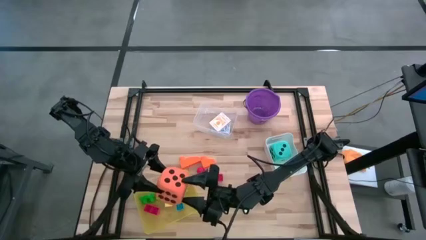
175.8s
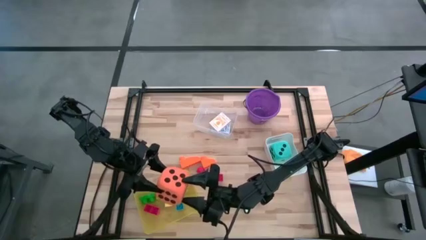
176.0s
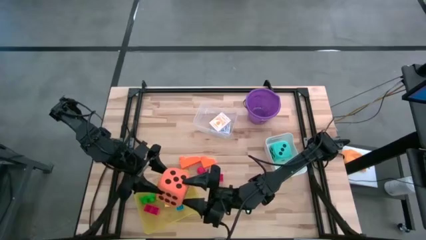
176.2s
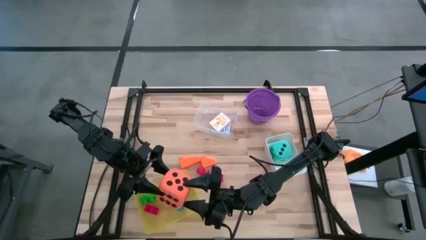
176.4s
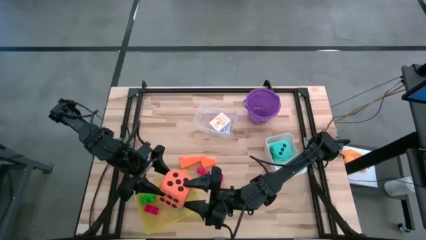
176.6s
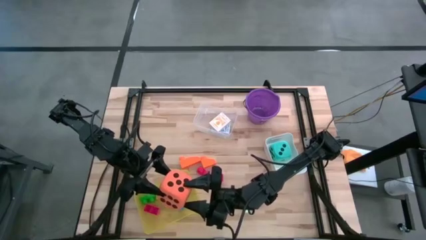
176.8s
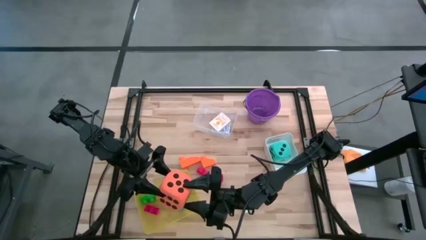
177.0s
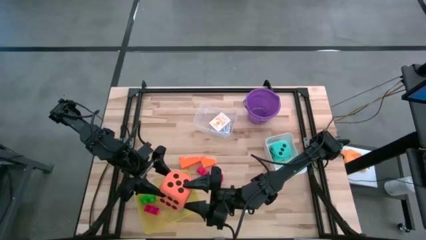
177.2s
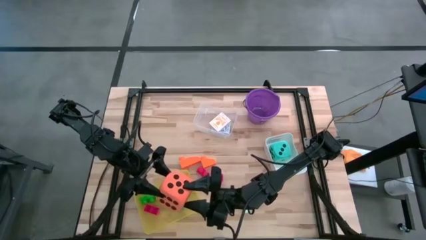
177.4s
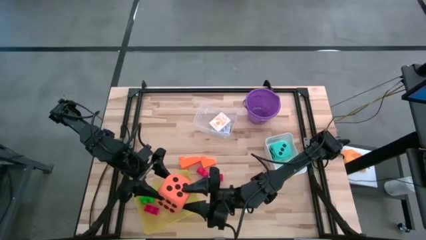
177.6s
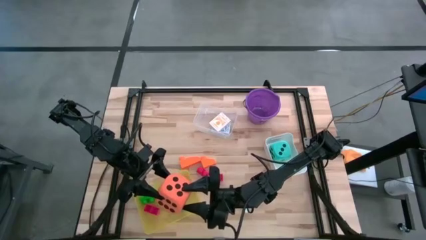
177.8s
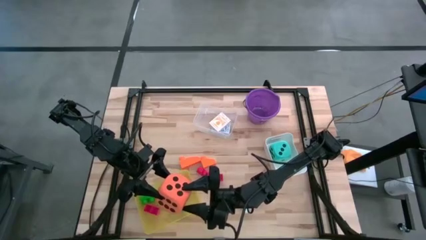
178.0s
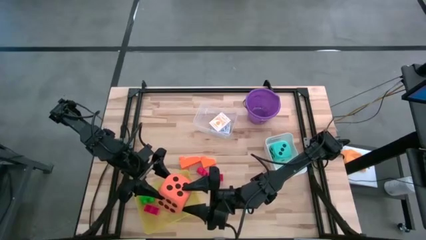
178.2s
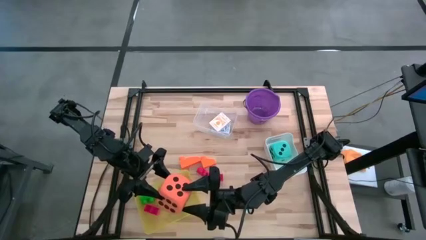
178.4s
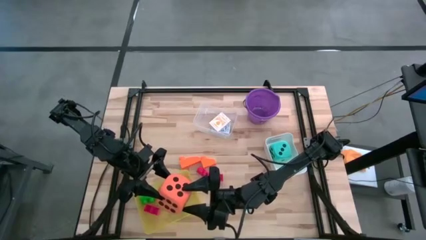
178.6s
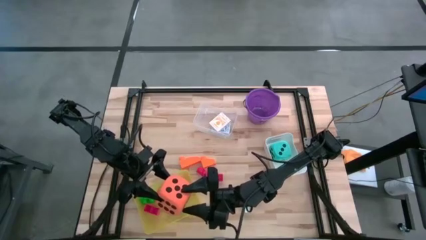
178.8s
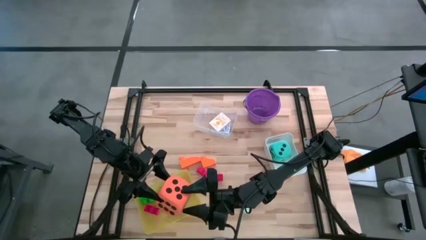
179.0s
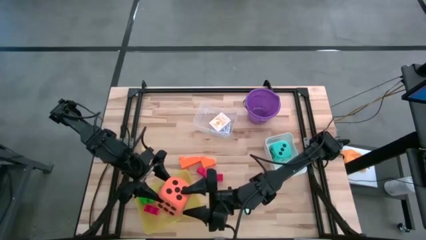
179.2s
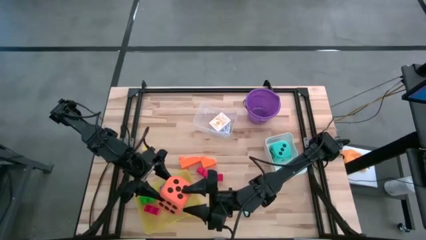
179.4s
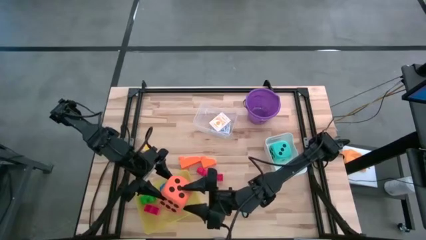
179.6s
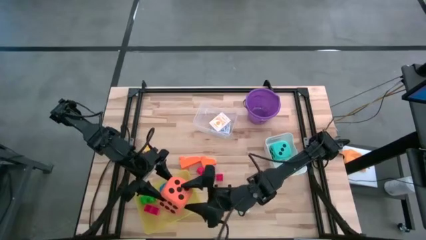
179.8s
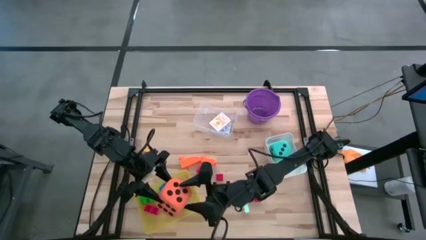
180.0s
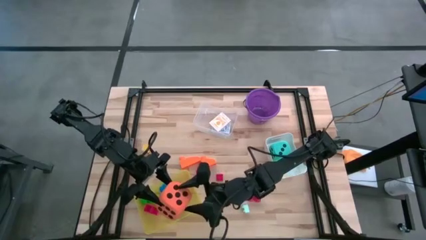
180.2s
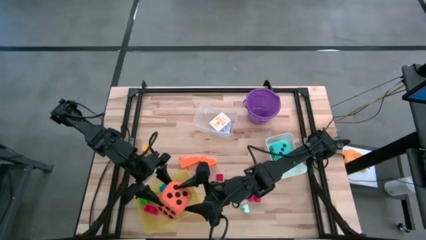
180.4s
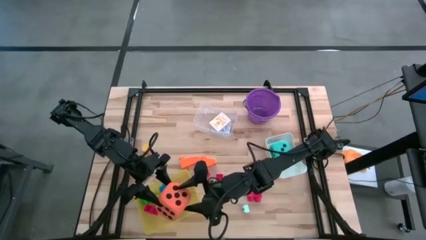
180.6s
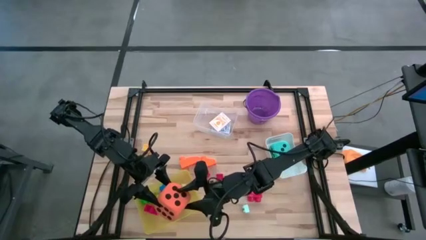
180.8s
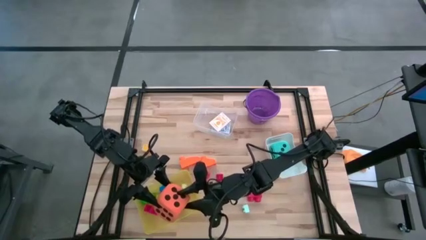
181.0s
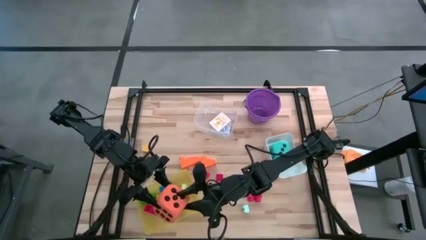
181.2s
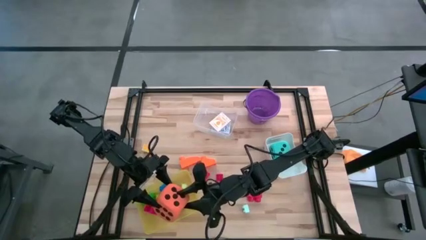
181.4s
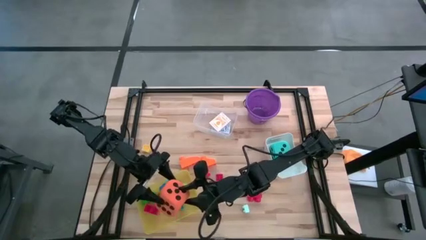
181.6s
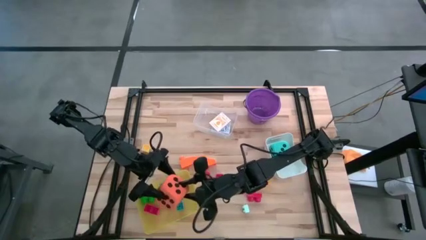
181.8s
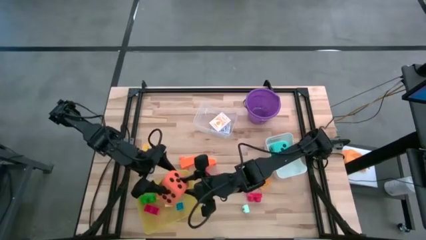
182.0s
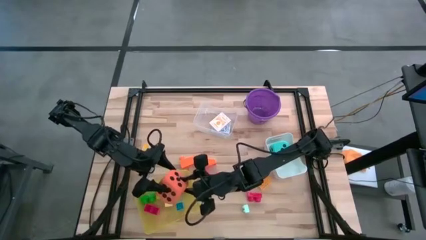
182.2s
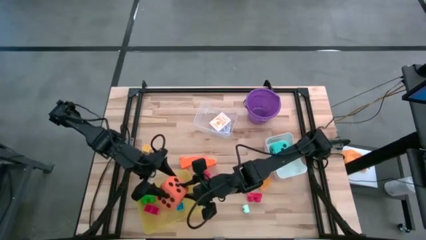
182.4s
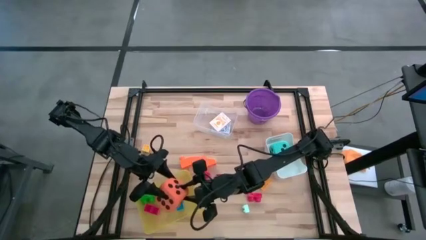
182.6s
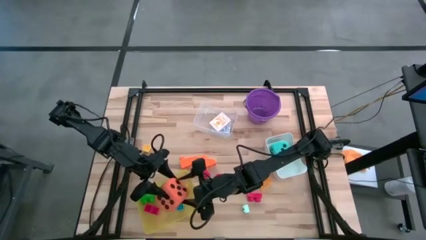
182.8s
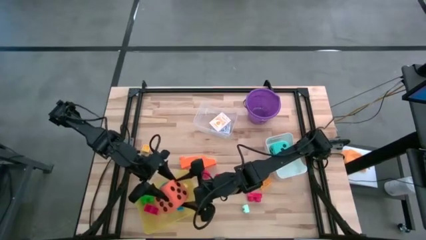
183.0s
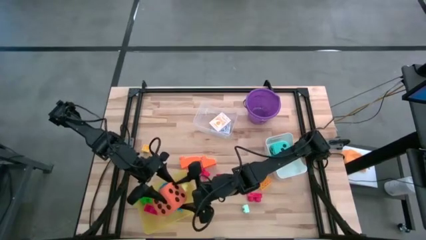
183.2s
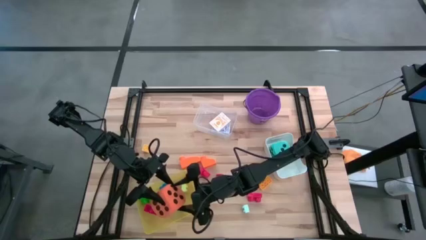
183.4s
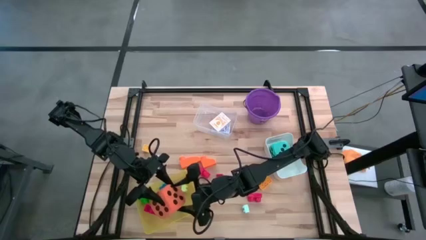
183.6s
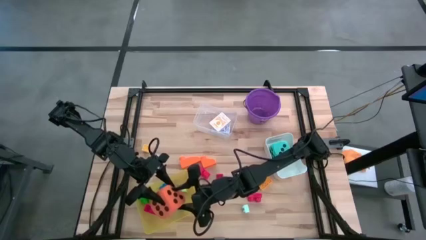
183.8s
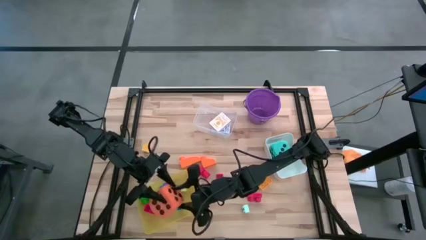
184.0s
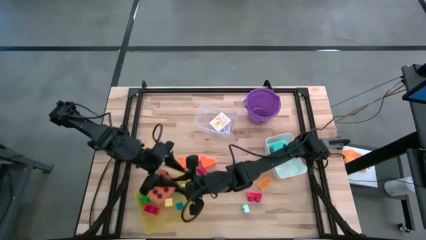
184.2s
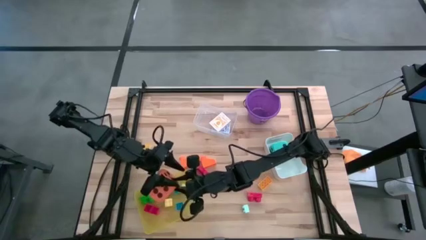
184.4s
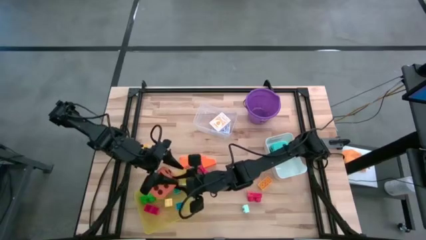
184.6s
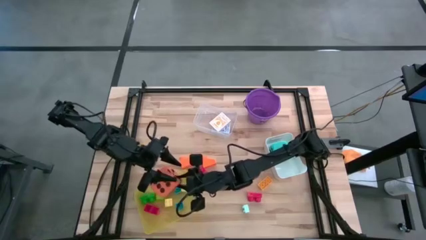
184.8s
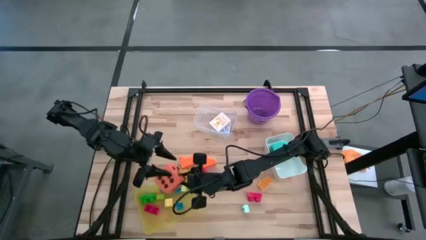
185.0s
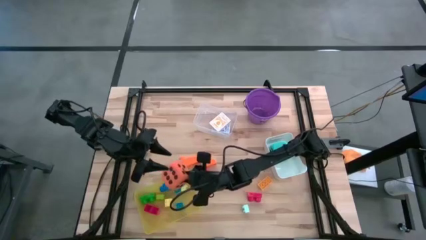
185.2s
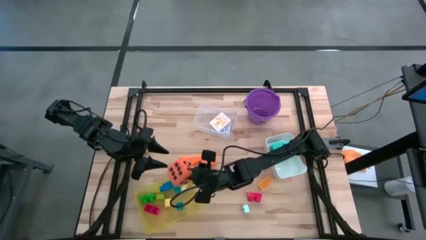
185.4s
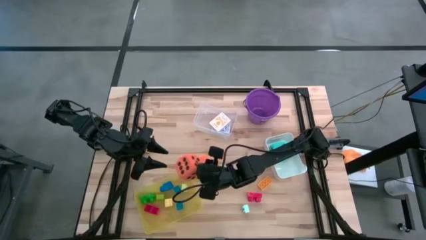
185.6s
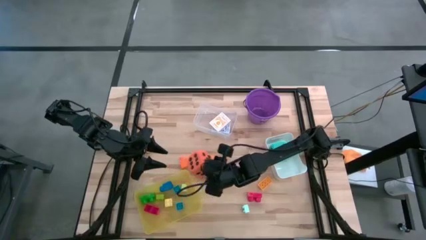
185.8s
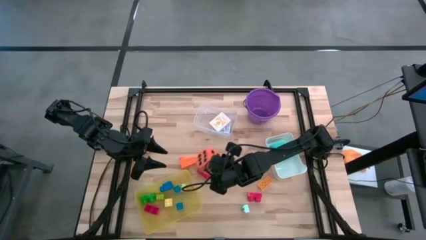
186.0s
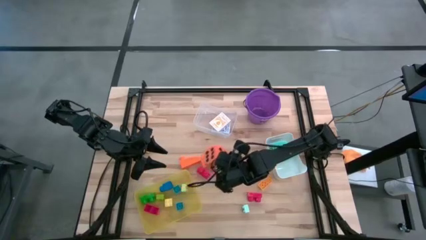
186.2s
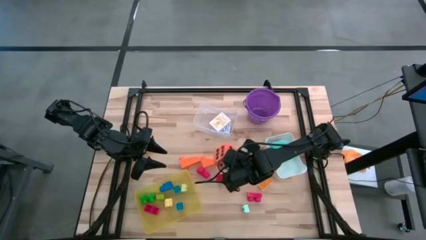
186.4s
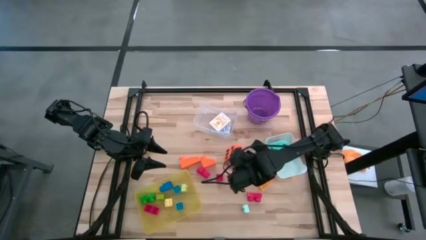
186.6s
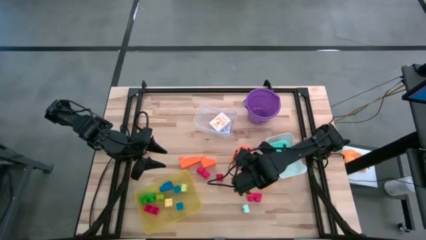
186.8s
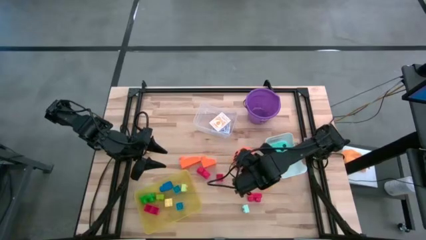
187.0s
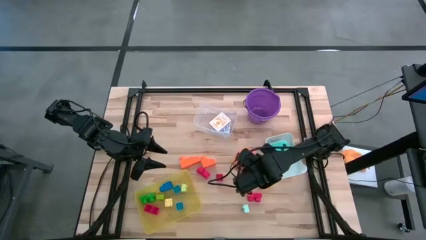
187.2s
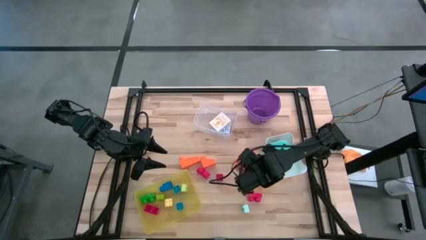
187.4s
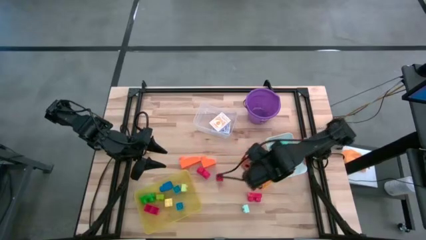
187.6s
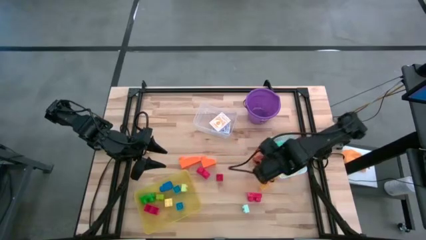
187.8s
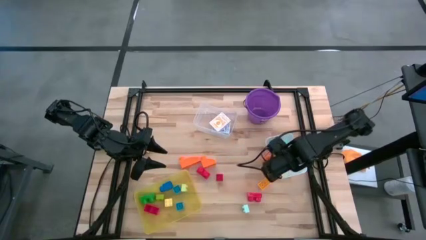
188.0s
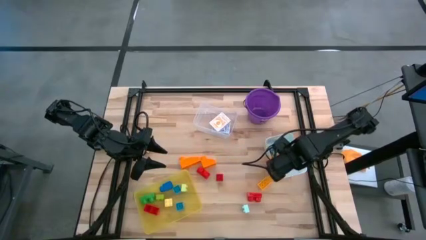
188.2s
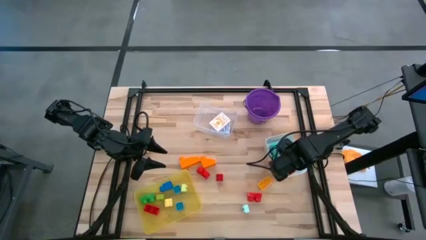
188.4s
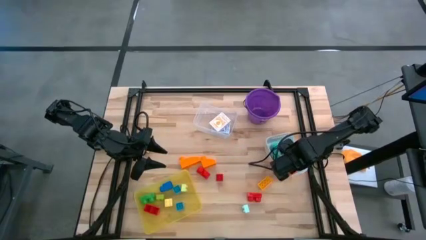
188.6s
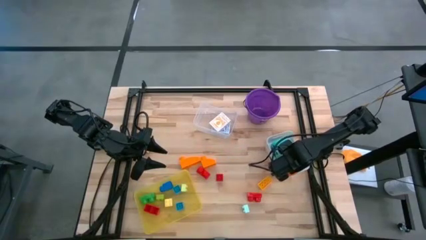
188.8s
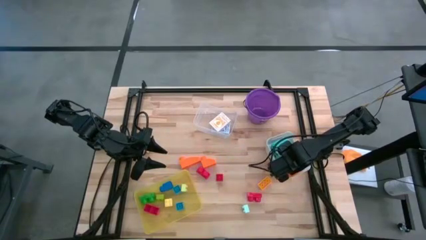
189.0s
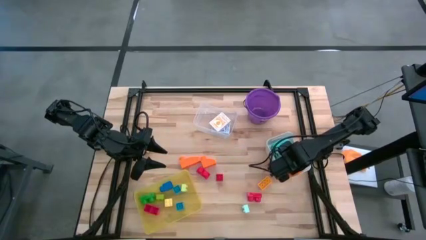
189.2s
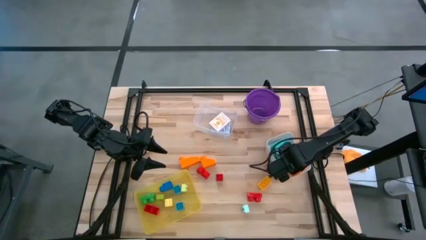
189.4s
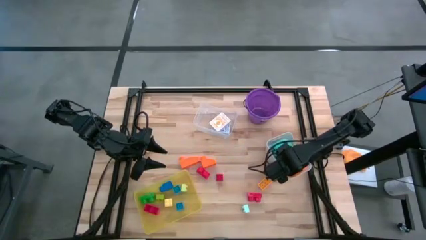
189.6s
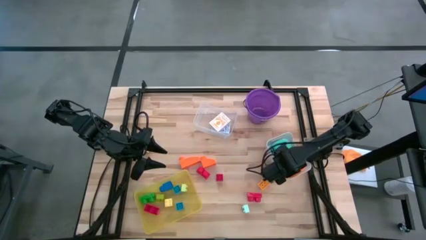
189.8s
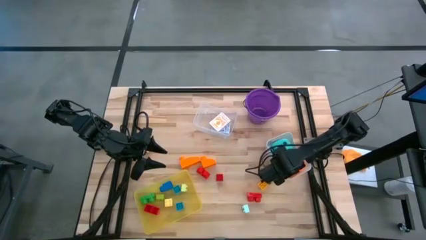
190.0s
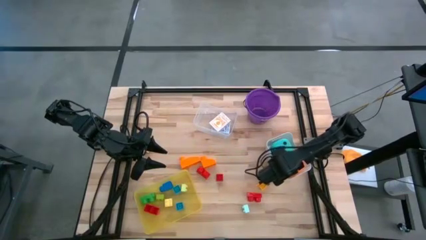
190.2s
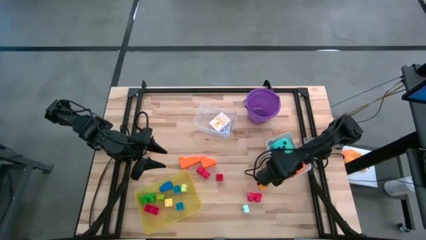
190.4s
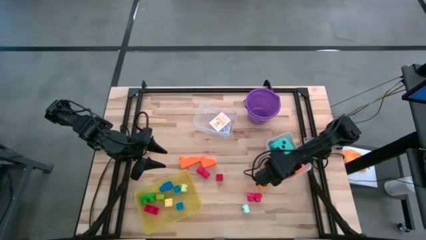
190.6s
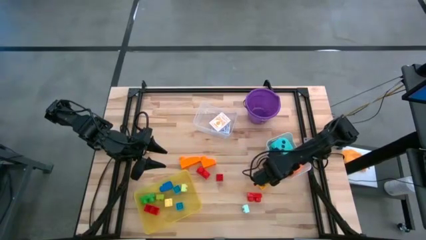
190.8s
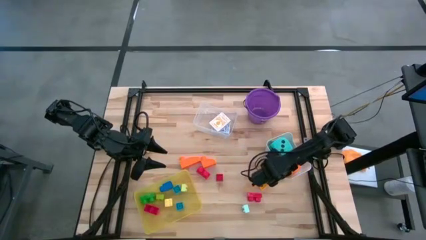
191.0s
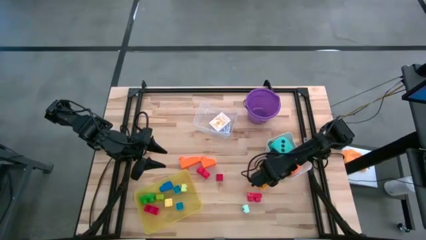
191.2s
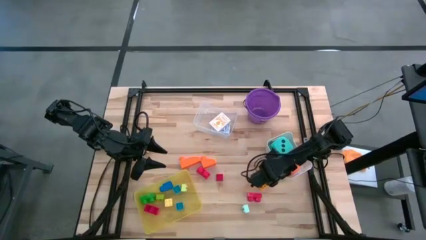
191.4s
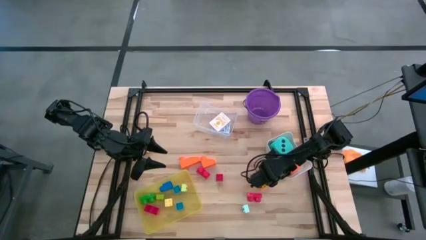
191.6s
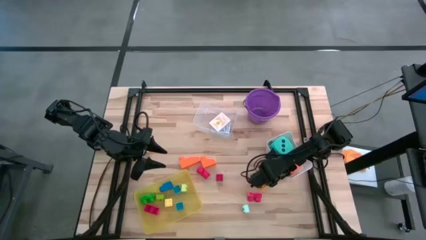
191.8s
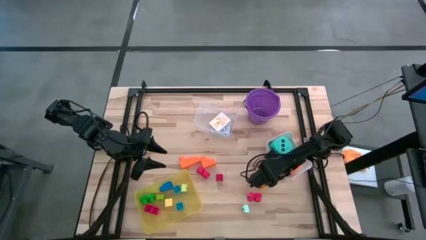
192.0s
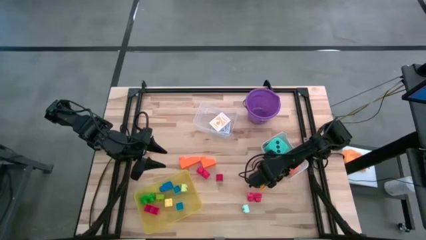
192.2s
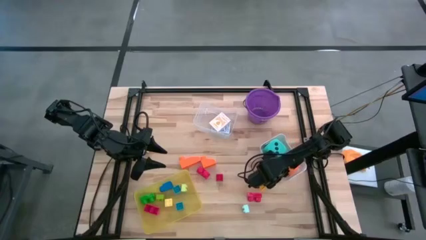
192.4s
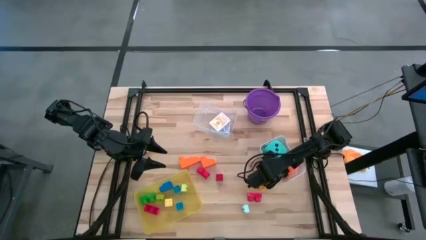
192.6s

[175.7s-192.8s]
Task: Pick & Place Toys
Put the orange dice into the white bin
